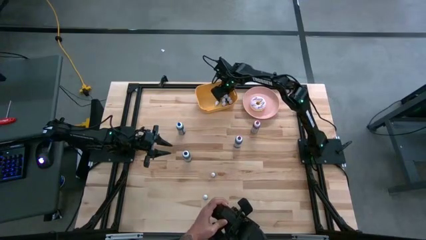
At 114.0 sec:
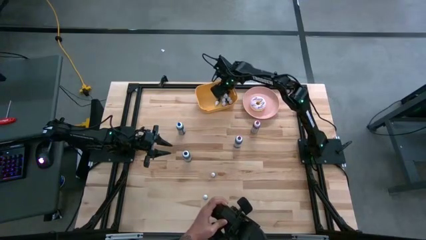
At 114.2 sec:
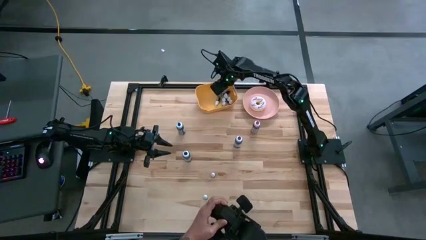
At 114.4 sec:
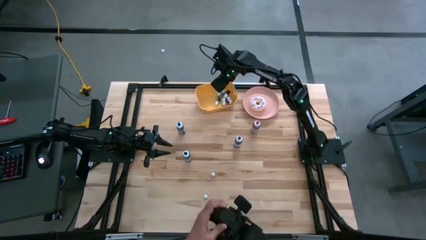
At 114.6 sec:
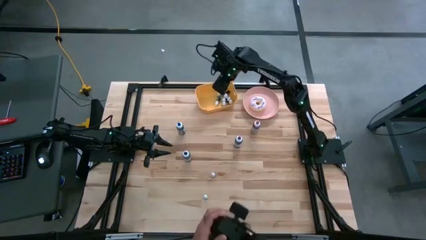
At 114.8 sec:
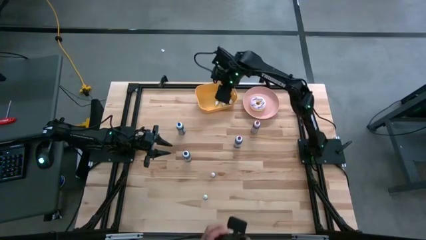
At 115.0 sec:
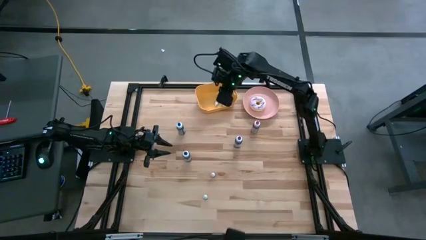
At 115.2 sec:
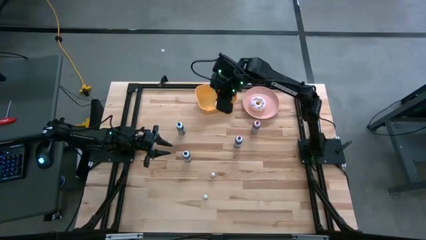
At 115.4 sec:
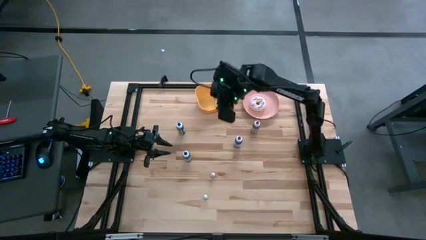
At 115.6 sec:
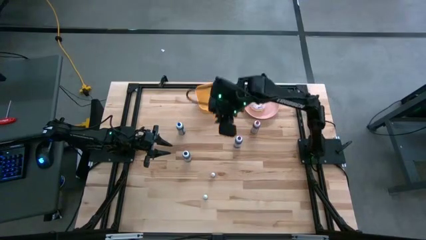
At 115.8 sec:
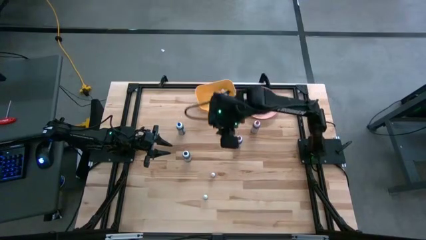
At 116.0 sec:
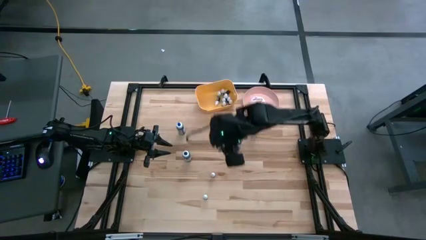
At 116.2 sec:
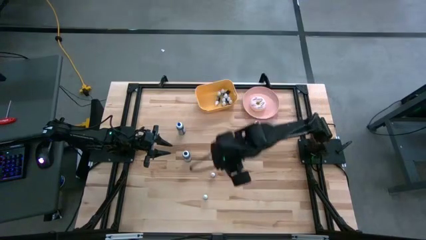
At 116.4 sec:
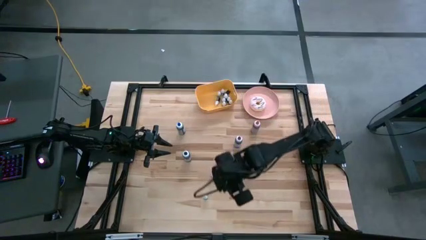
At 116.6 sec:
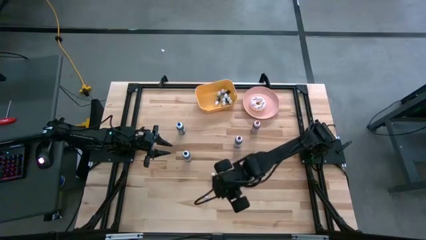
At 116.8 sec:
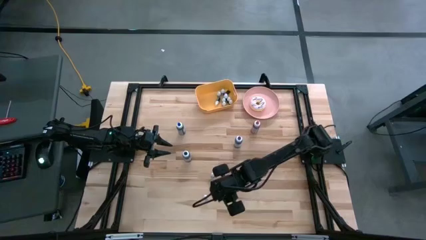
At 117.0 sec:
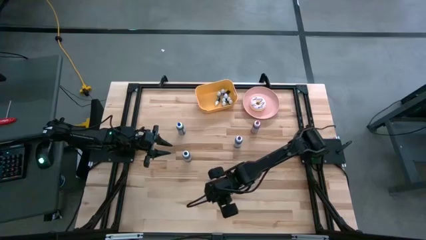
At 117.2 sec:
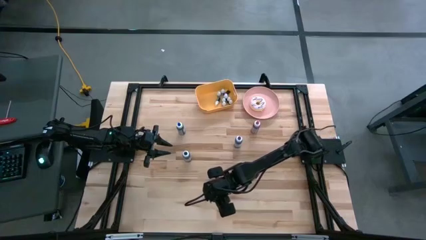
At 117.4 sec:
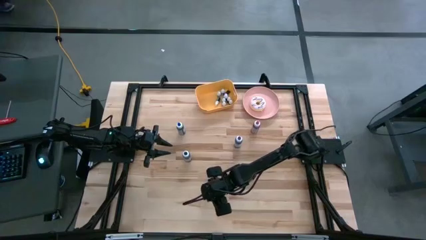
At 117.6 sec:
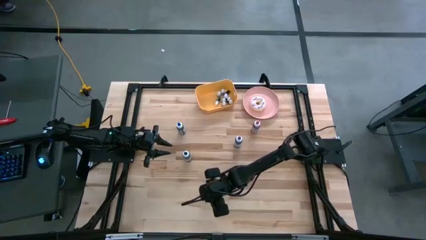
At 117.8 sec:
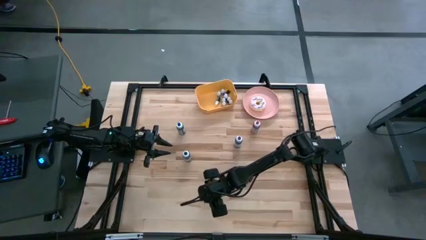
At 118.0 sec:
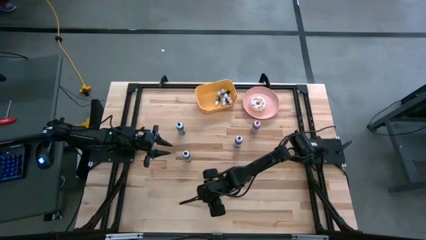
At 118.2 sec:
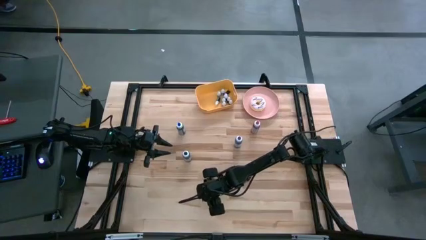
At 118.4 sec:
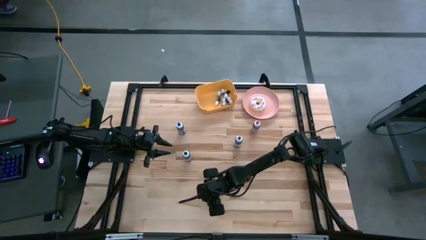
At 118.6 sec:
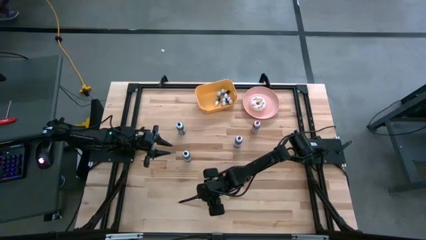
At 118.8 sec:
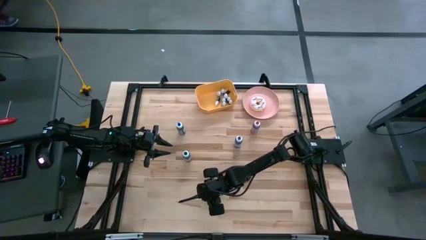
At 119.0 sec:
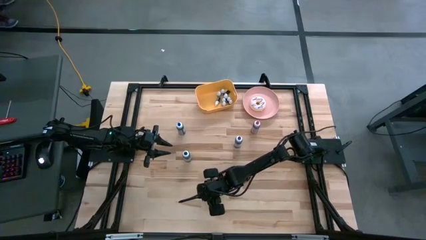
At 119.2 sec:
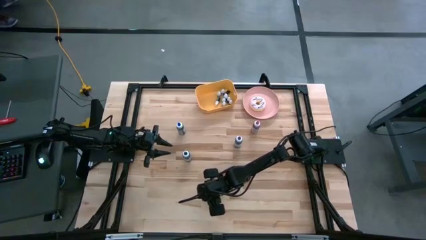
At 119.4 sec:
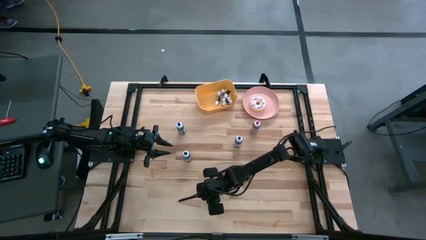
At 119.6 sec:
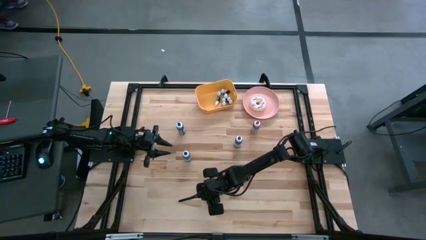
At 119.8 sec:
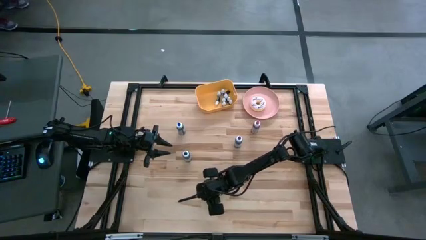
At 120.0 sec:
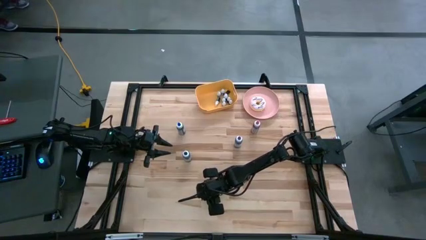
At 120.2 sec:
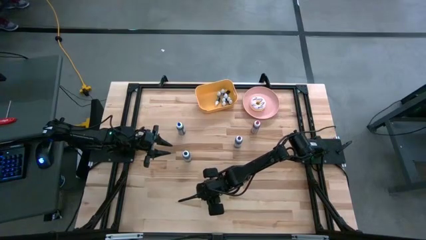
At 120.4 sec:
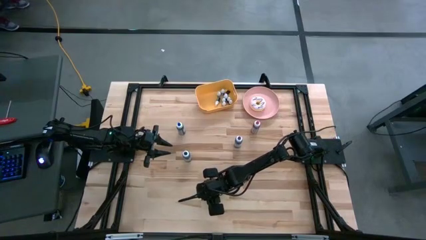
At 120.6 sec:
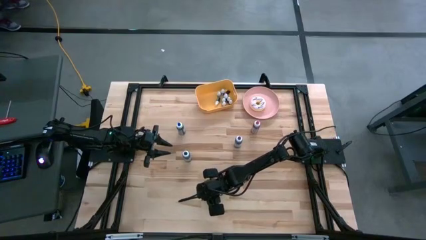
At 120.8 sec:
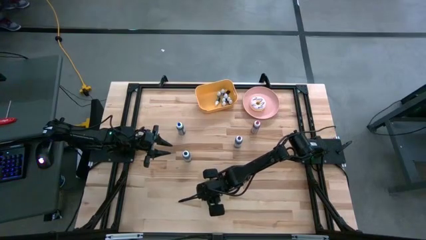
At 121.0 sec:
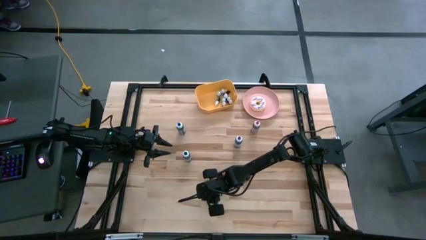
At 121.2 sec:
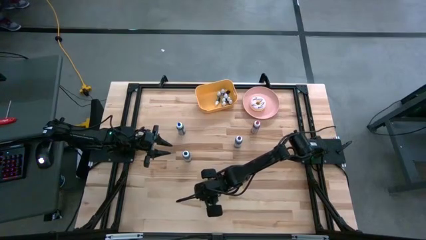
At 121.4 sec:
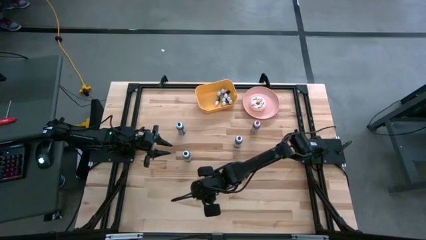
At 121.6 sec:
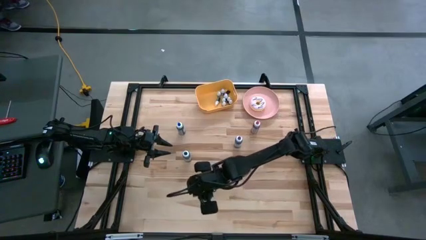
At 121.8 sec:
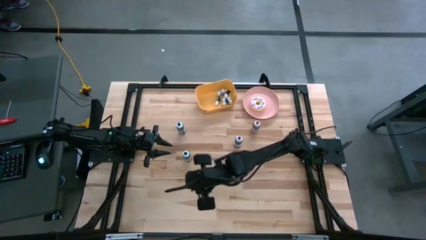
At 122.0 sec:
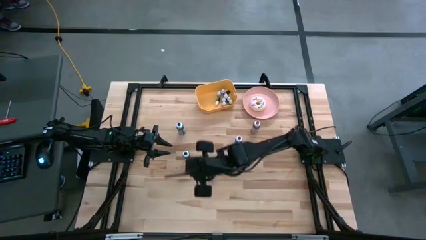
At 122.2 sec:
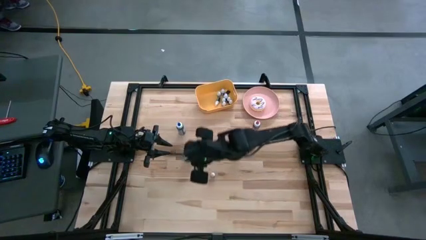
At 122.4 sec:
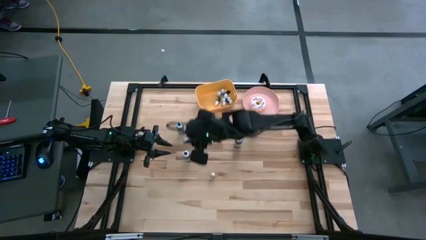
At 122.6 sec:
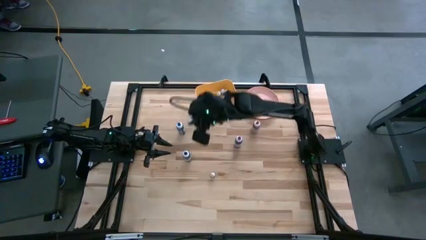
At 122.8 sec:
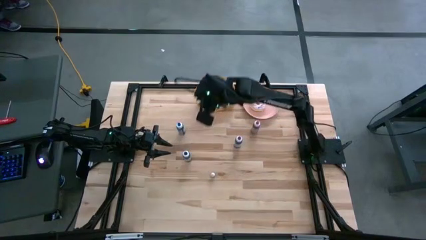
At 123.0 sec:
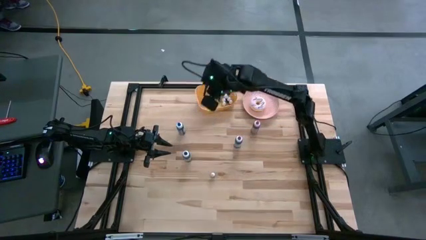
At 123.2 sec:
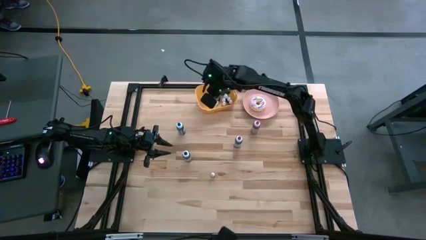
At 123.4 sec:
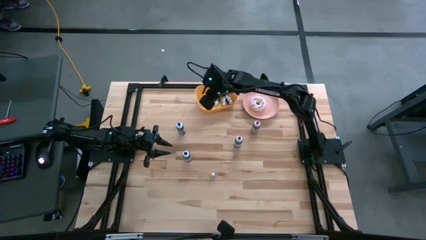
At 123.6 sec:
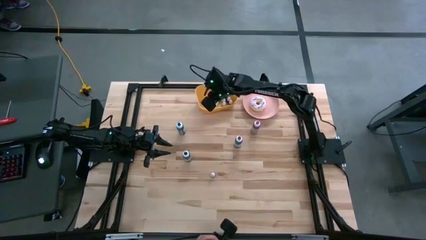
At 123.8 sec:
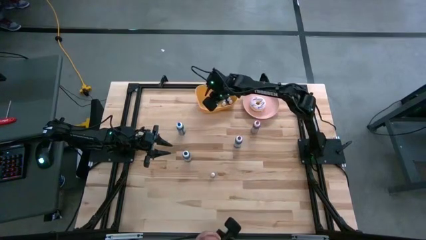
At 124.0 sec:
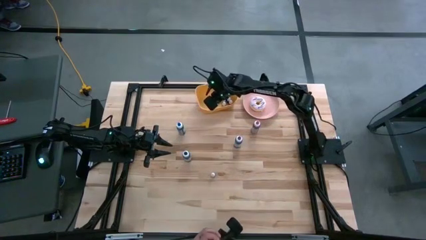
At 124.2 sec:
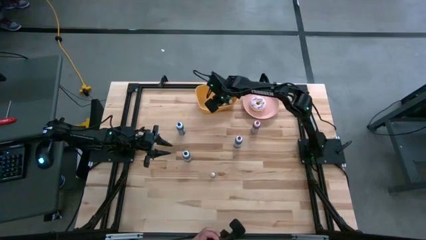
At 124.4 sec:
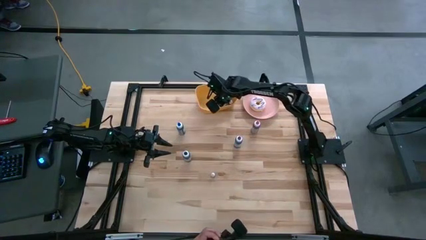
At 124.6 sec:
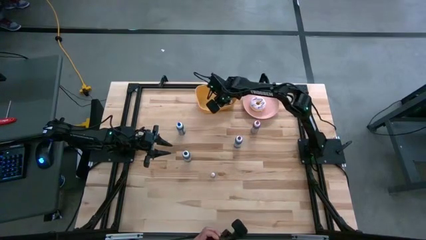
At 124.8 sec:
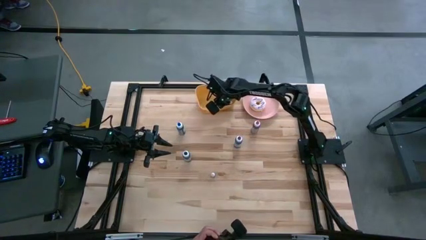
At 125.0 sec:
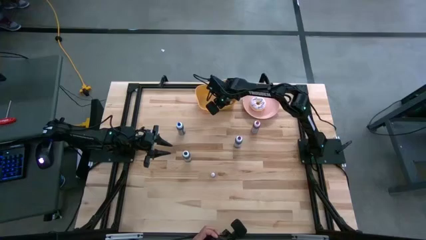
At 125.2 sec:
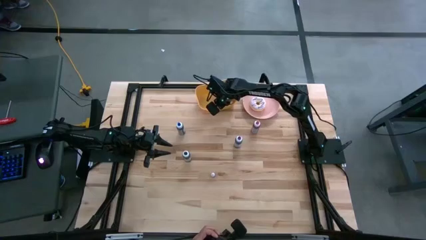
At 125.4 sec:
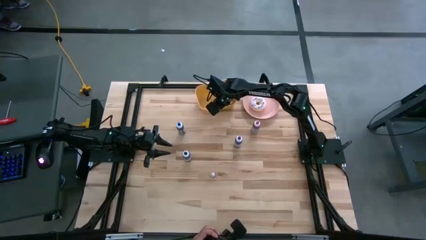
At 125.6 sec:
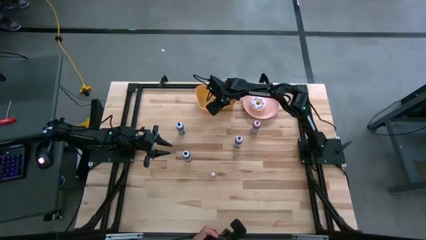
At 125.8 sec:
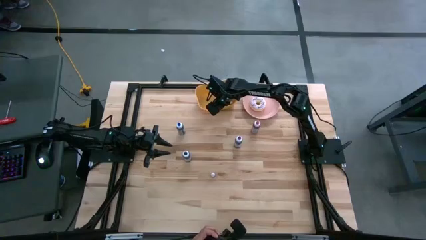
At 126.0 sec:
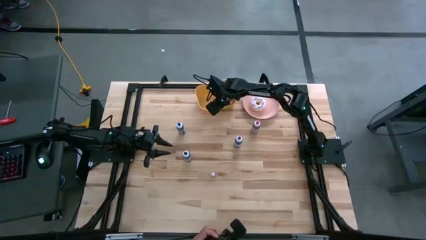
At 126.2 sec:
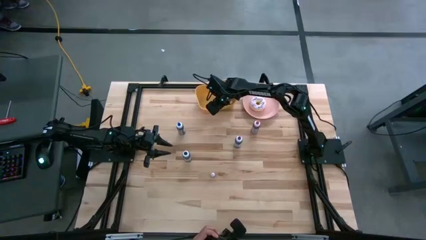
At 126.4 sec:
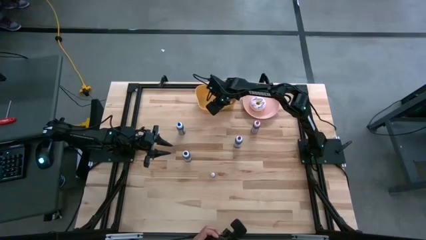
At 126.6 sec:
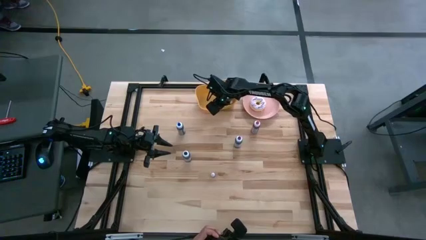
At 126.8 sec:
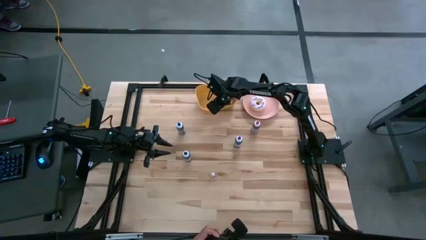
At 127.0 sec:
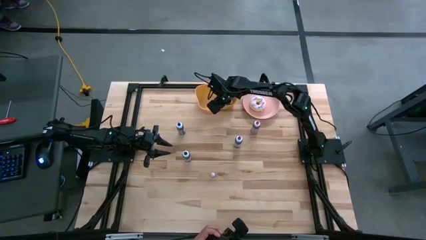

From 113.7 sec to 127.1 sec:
Task: Pick & Place food coloring
Put the small green food coloring bottle into the yellow bin

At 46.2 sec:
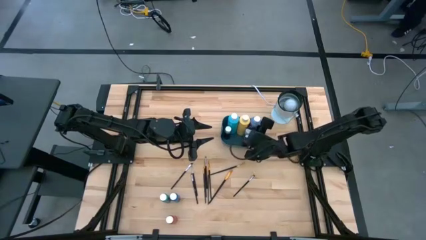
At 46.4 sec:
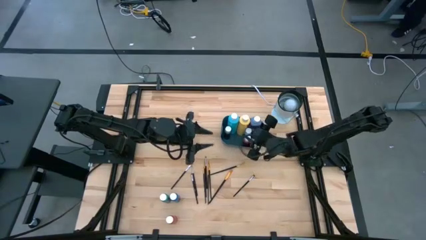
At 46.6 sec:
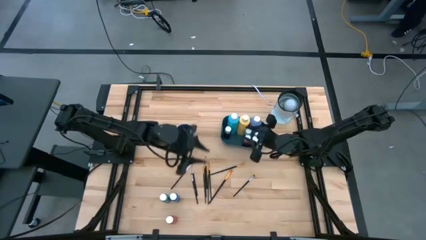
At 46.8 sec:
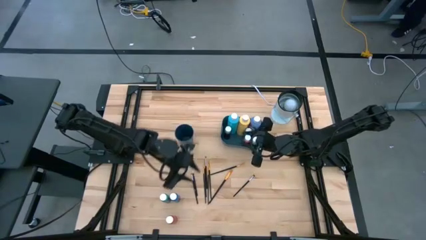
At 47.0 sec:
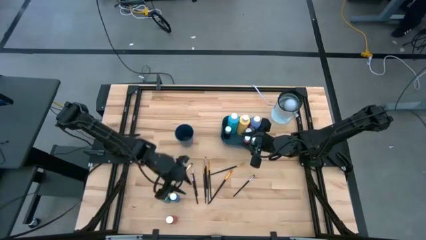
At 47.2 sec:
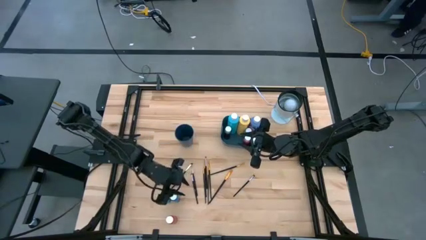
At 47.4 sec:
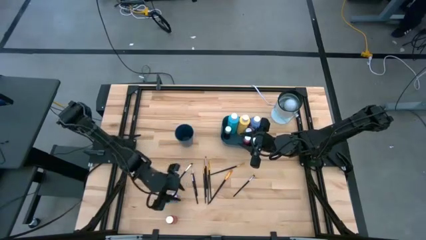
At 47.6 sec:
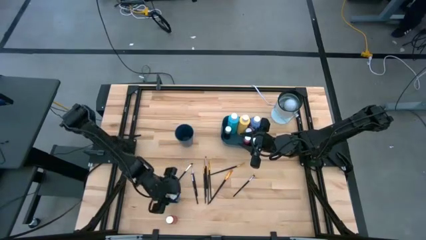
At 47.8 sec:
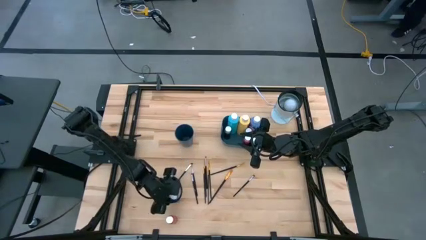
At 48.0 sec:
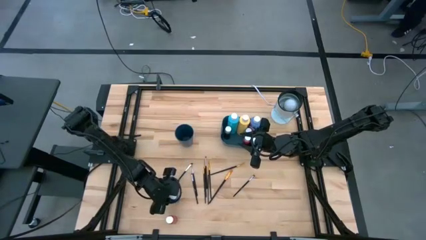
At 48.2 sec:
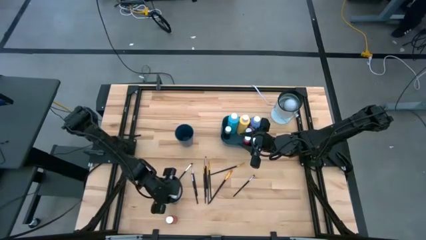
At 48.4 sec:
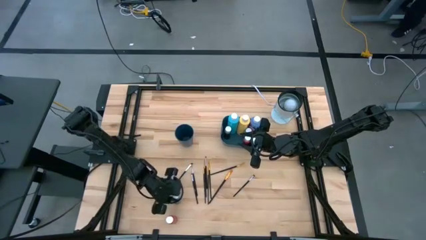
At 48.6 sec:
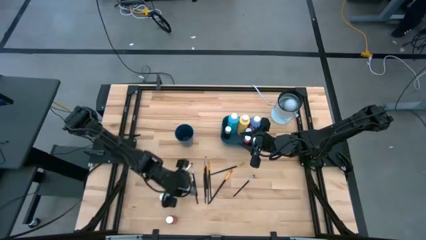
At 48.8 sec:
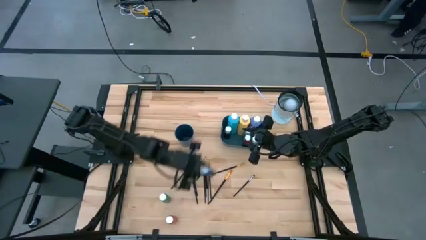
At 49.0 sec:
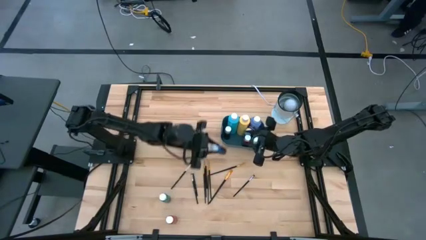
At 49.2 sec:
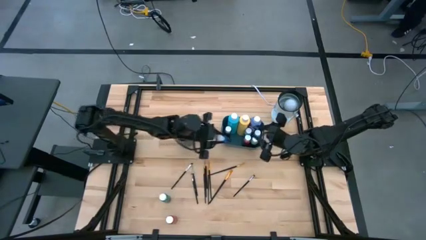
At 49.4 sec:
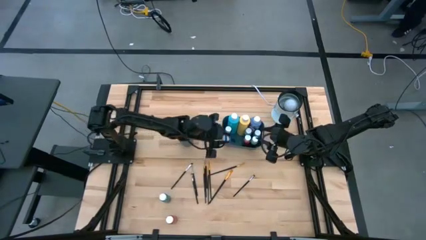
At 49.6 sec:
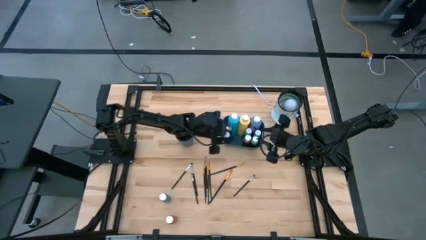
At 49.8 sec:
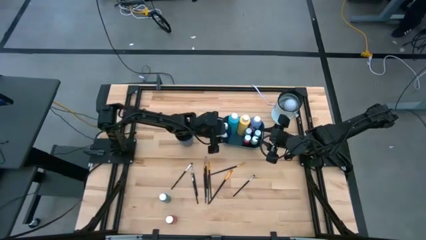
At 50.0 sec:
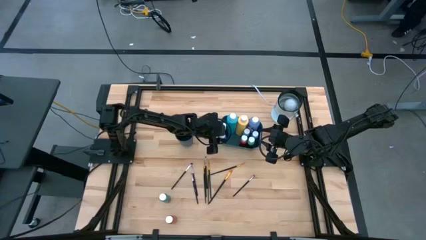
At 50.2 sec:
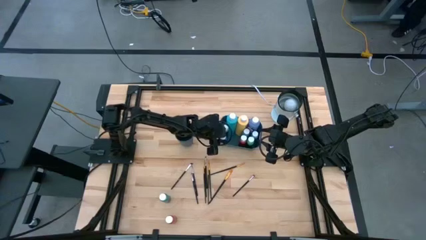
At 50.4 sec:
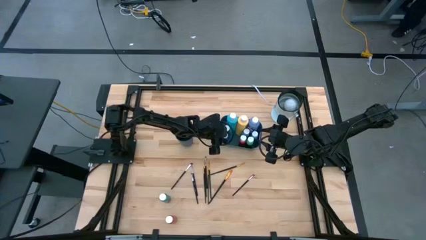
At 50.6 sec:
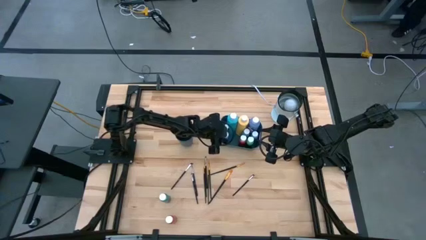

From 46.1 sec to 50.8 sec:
Task: Pick & Place Paint Supplies
Put the small dark blue paint bottle into the blue bin
